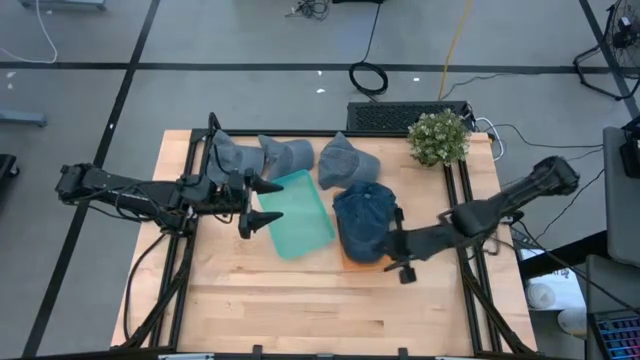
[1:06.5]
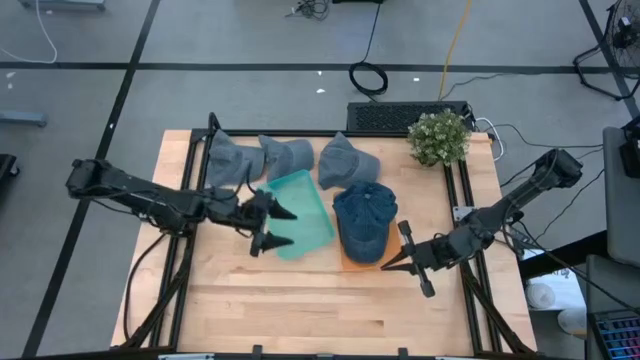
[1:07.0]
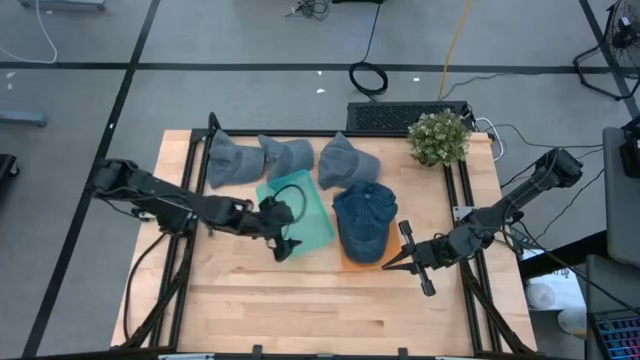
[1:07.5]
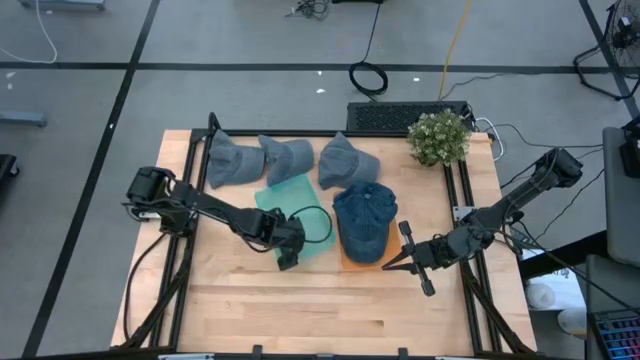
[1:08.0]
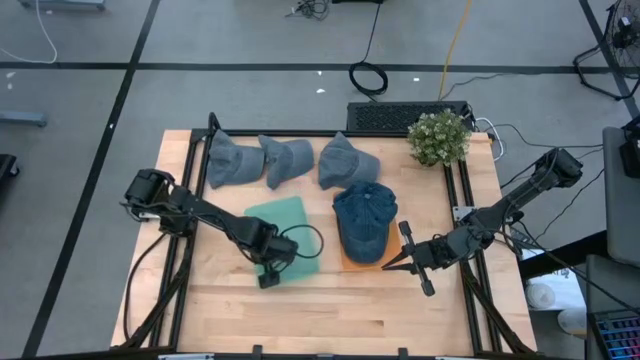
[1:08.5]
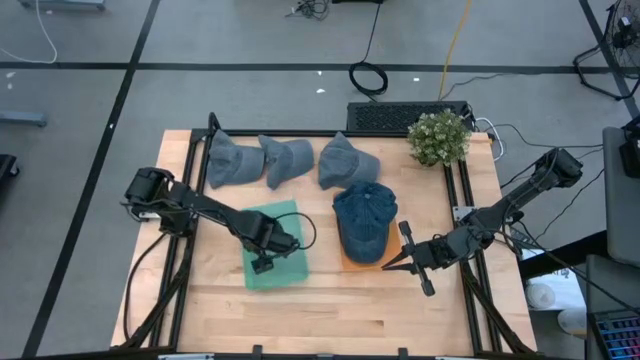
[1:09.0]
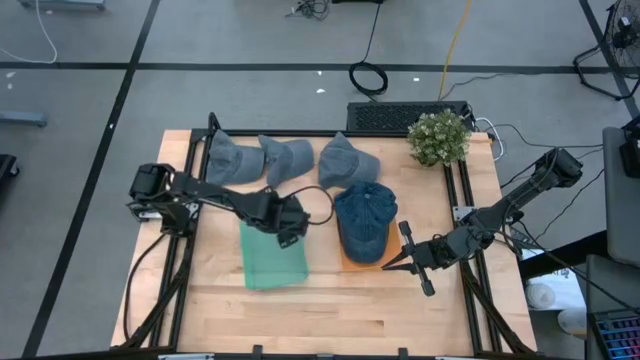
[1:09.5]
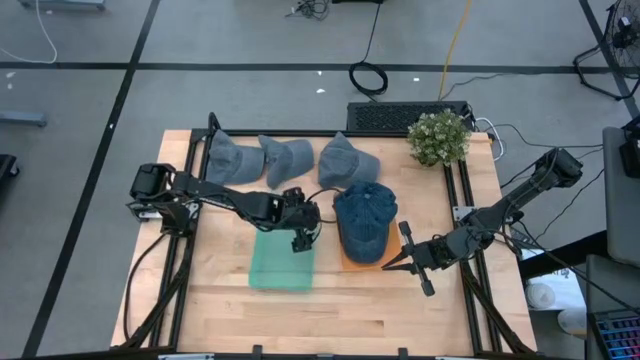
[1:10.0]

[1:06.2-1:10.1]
Task: Pick & Place hat
Adjust the light blue bin

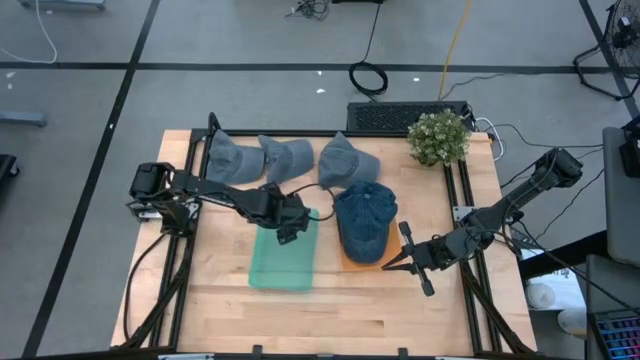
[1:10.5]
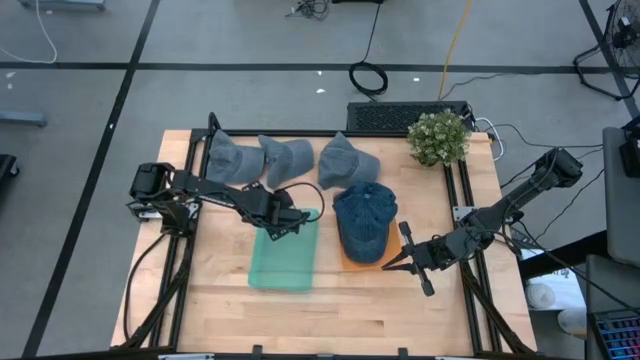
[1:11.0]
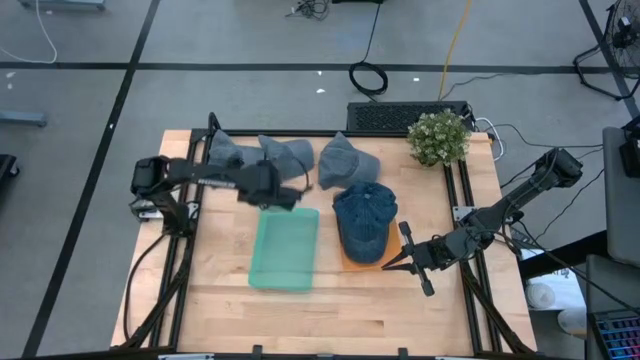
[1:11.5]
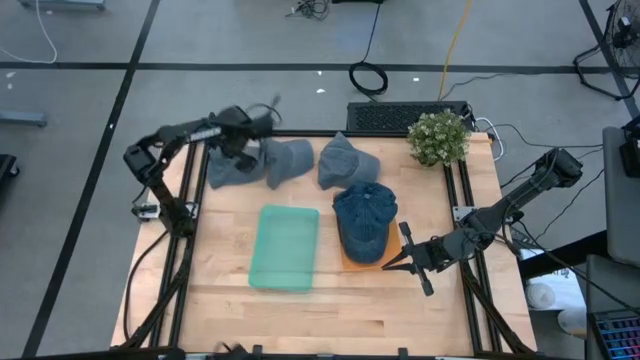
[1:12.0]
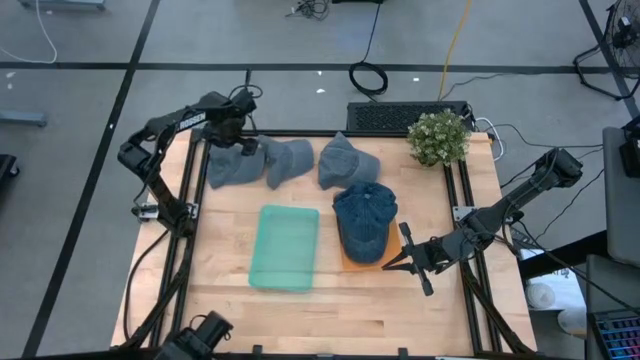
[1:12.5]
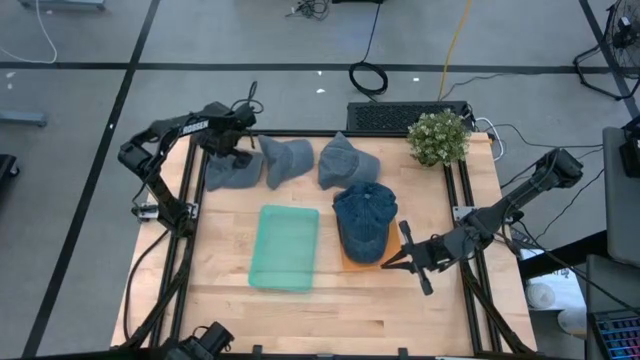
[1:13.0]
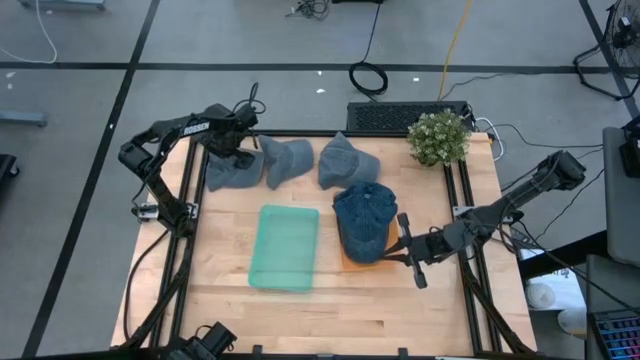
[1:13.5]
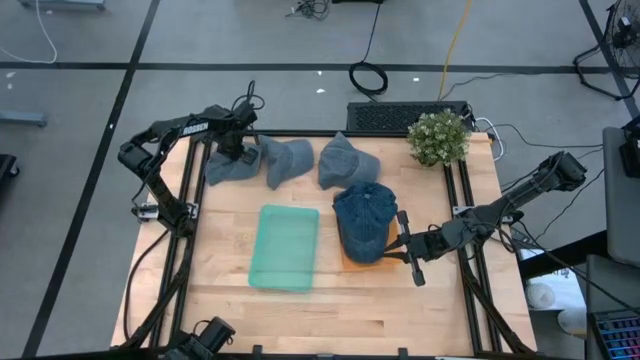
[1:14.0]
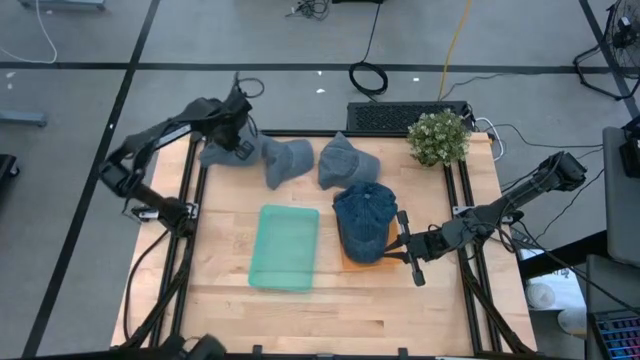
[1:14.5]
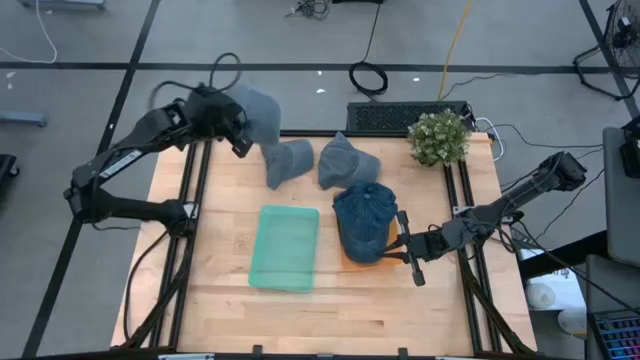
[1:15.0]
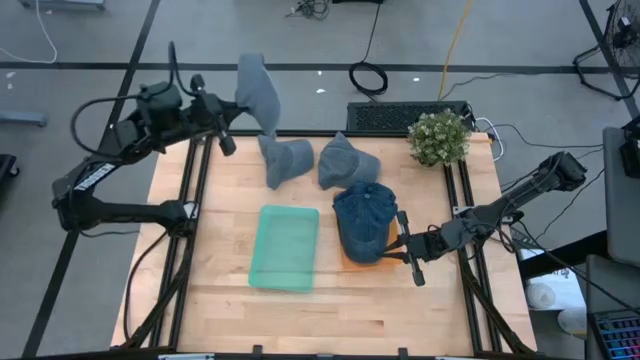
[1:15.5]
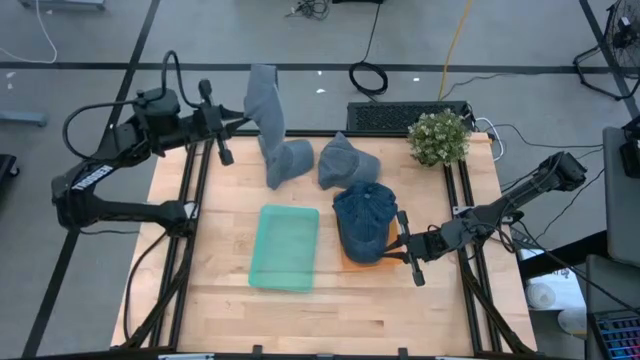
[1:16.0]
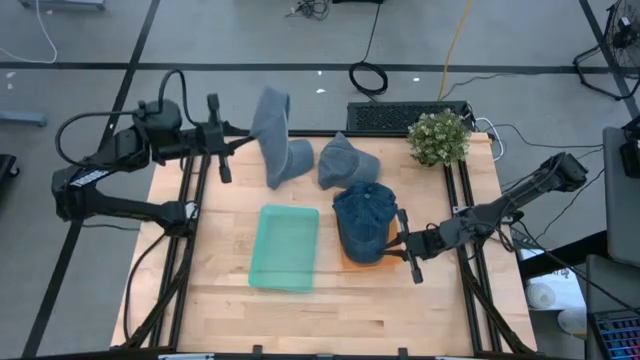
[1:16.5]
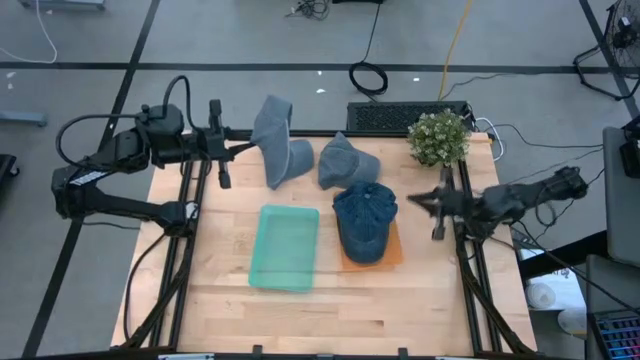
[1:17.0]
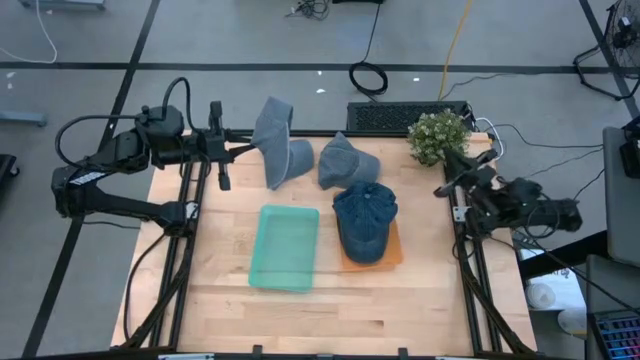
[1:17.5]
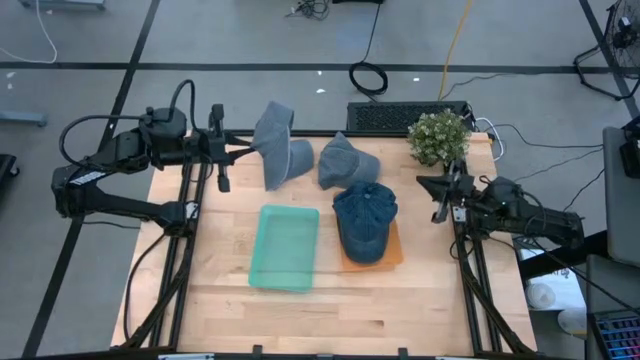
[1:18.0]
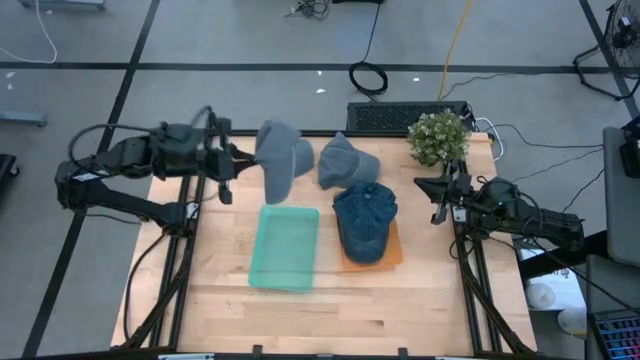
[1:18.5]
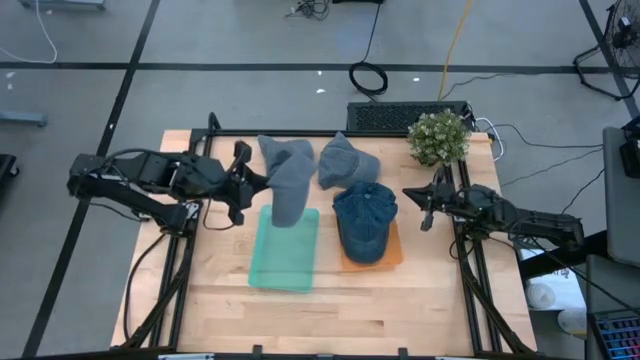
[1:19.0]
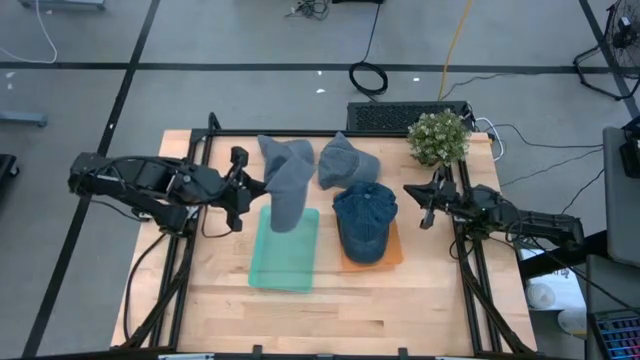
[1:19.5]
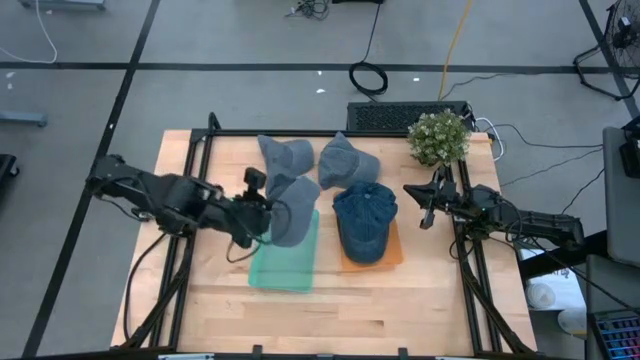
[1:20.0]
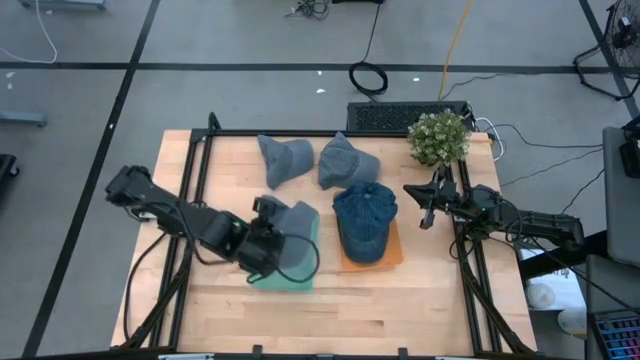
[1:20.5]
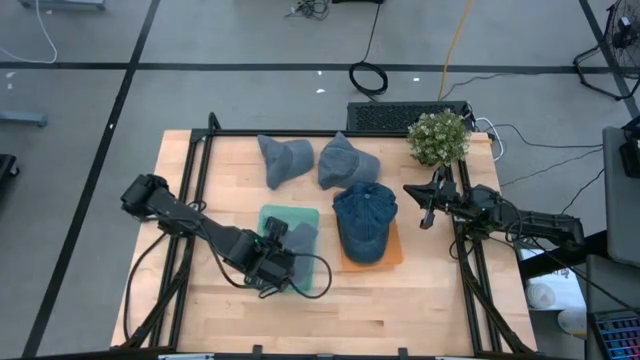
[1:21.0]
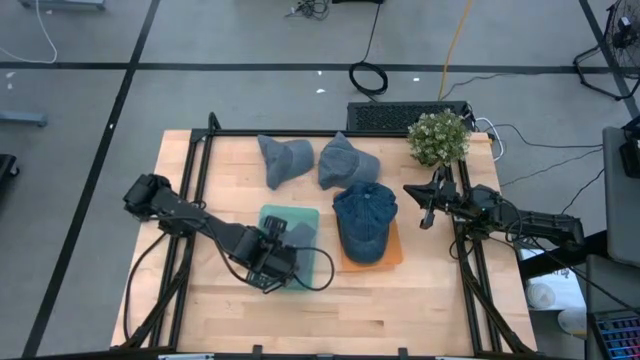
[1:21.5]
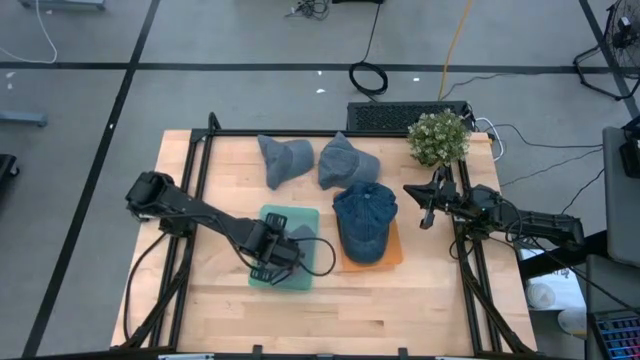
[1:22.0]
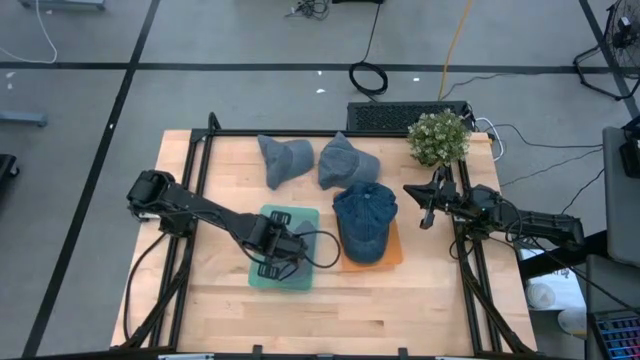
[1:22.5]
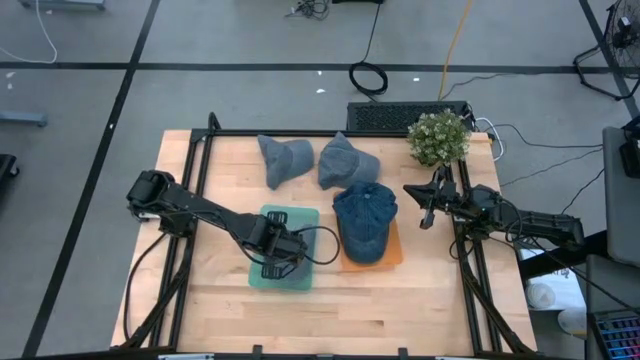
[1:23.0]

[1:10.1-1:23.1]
Put the left gray cap into the light blue bin

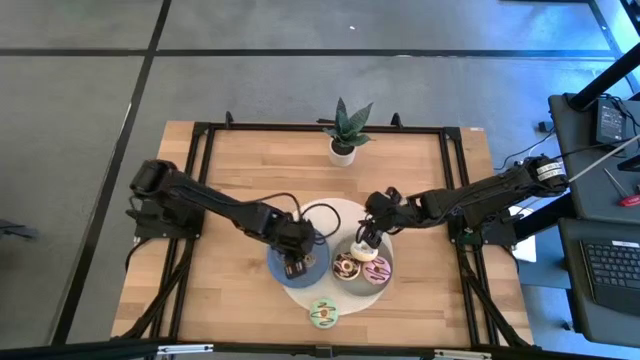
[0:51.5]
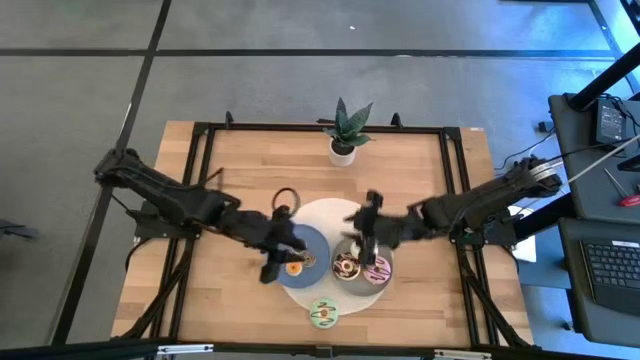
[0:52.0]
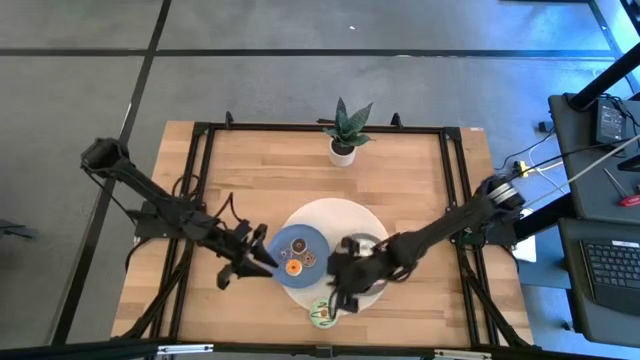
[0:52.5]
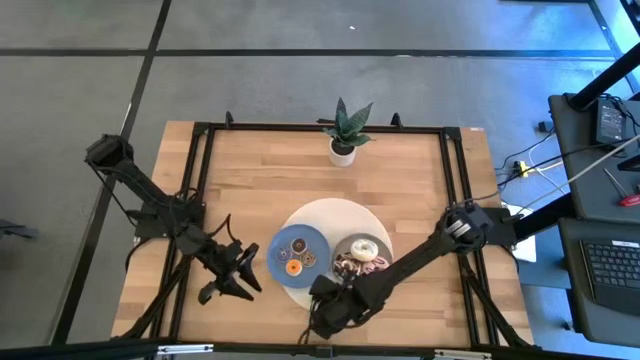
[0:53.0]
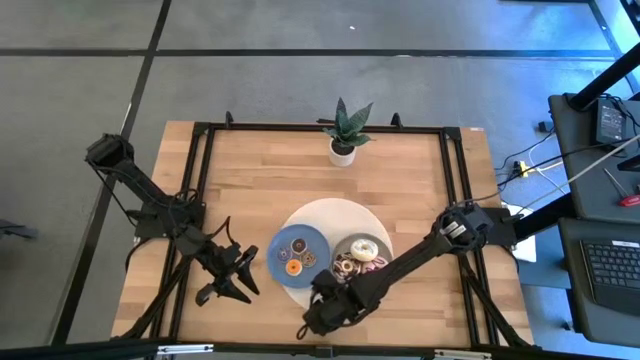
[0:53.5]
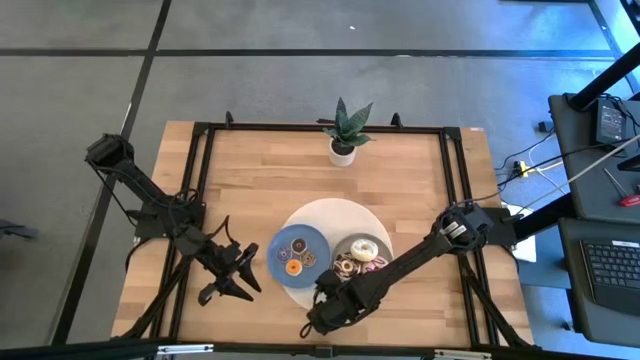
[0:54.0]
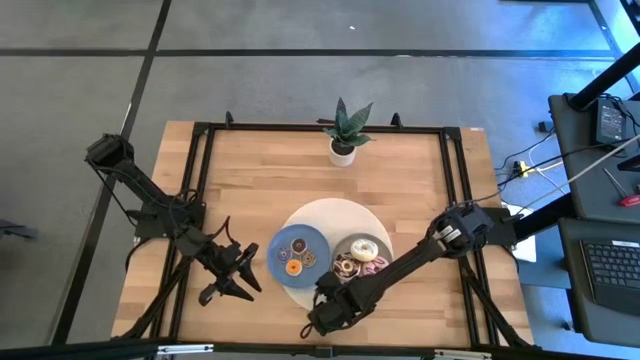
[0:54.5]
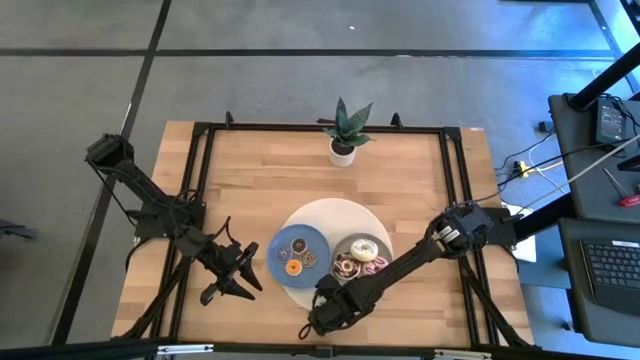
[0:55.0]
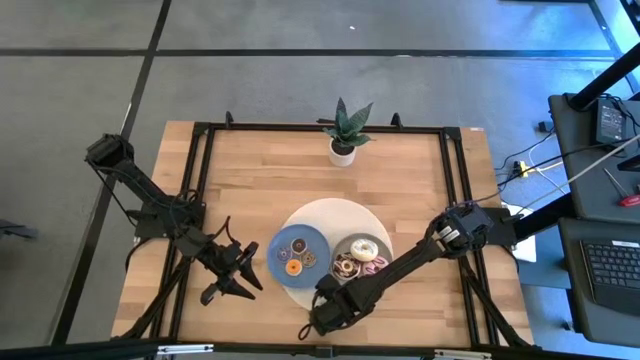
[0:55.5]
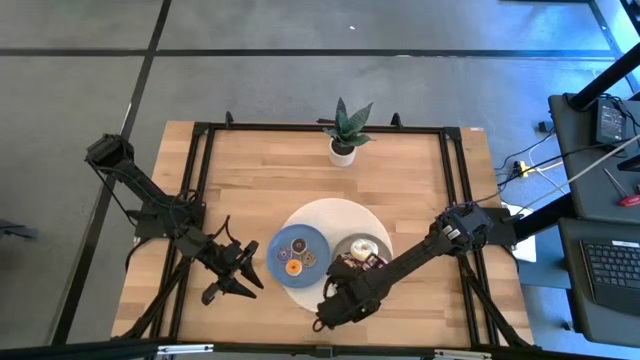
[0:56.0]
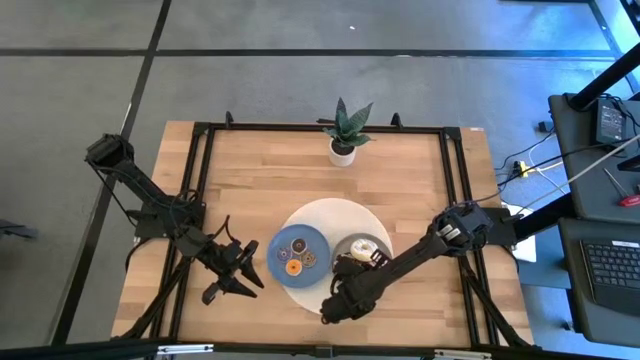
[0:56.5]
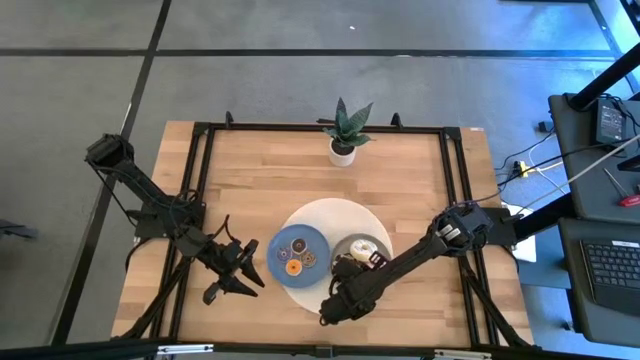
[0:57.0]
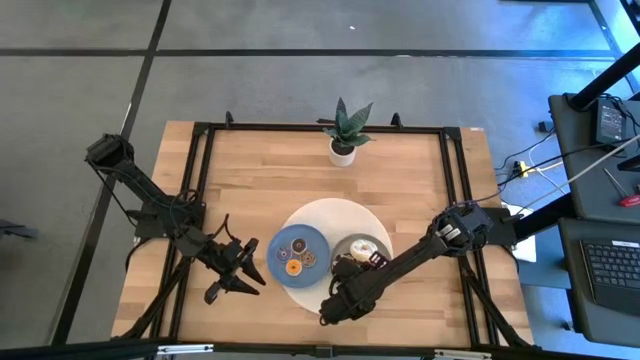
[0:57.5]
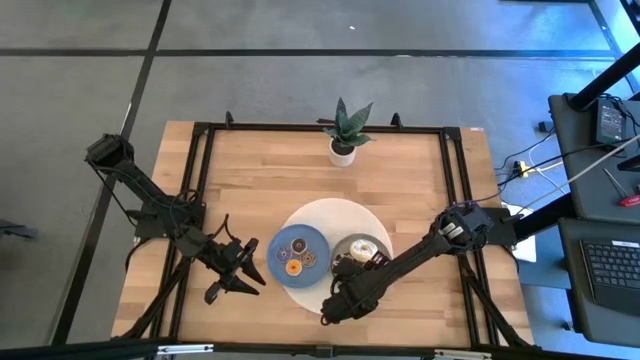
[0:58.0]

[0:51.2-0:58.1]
Task: Pick & Place donuts
Put the large green donut on the gray plate
